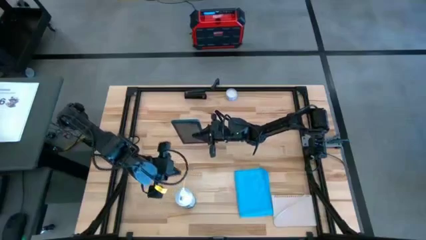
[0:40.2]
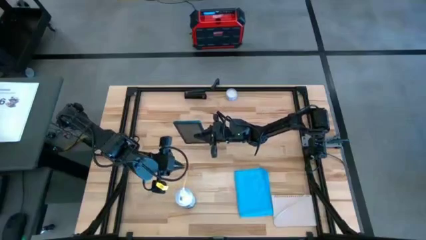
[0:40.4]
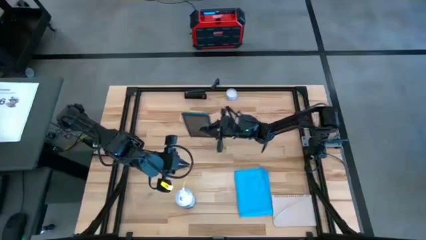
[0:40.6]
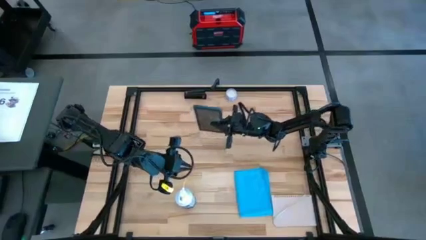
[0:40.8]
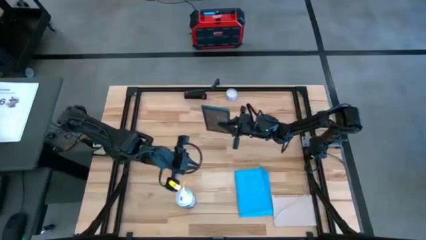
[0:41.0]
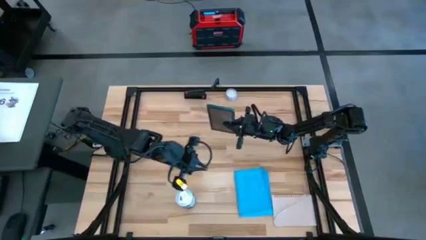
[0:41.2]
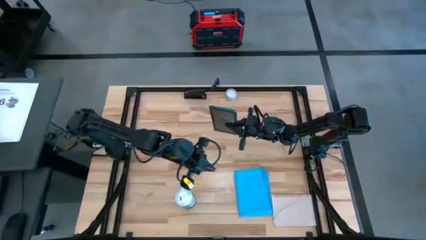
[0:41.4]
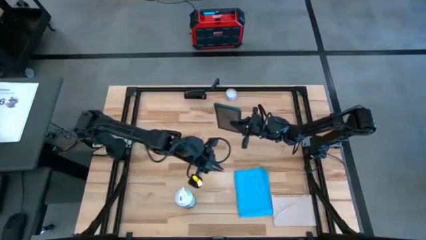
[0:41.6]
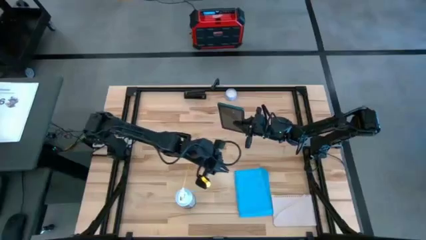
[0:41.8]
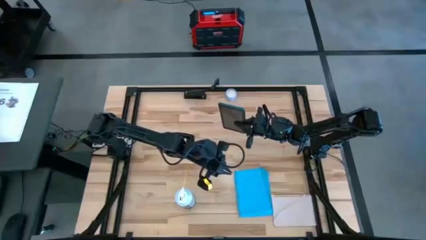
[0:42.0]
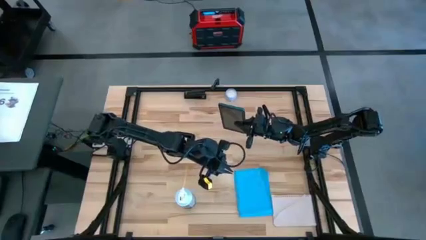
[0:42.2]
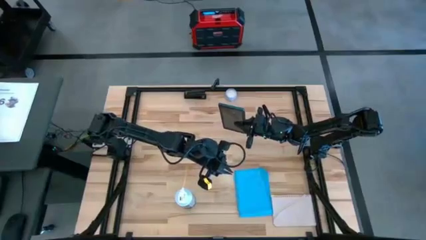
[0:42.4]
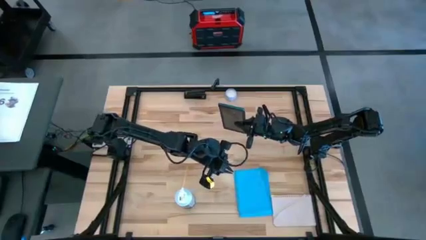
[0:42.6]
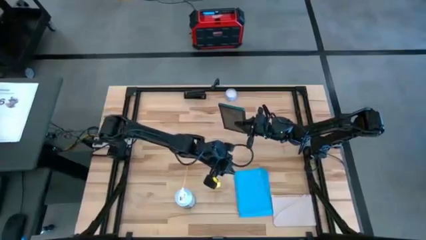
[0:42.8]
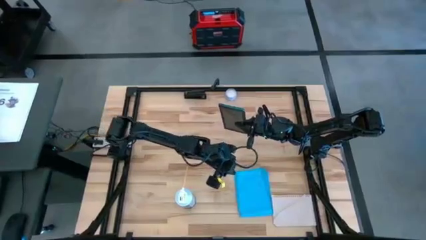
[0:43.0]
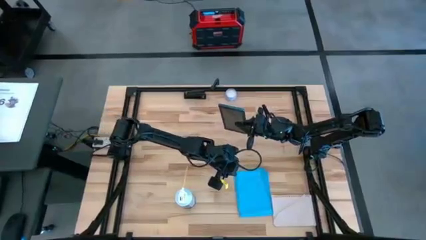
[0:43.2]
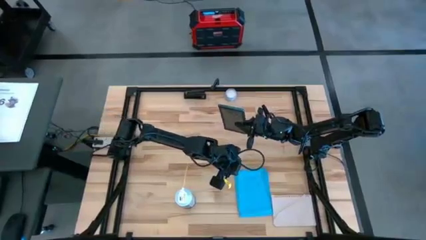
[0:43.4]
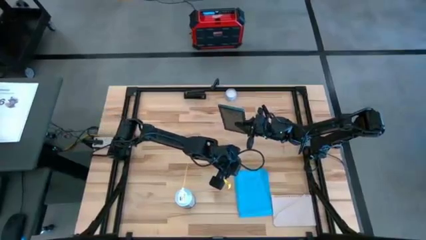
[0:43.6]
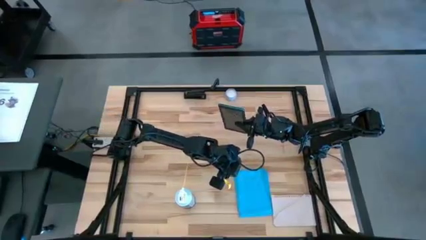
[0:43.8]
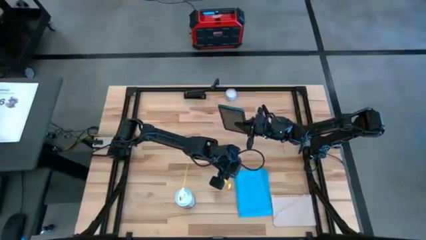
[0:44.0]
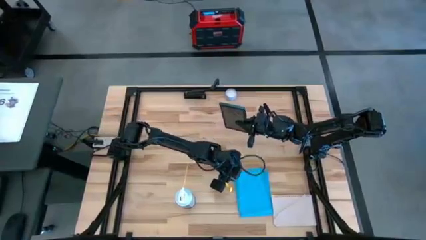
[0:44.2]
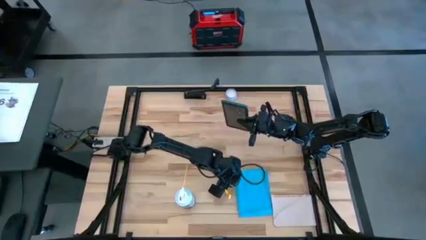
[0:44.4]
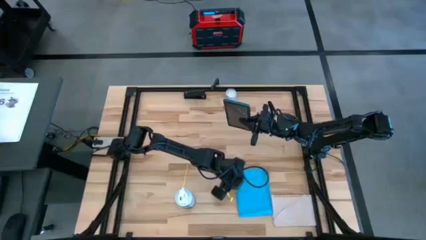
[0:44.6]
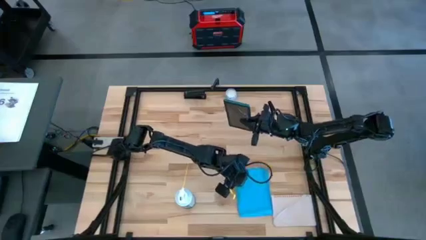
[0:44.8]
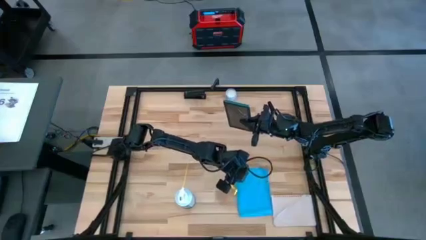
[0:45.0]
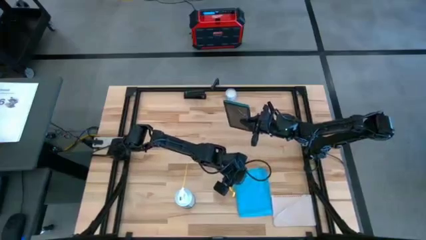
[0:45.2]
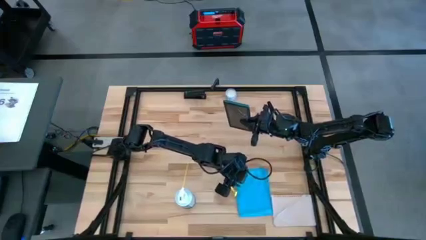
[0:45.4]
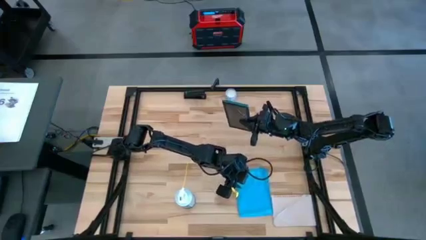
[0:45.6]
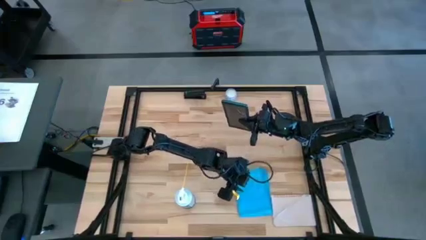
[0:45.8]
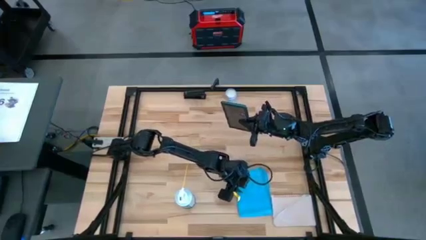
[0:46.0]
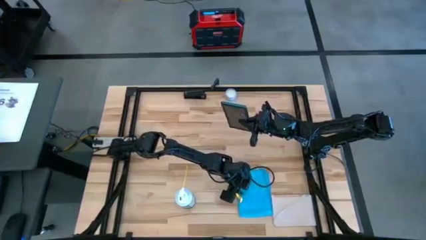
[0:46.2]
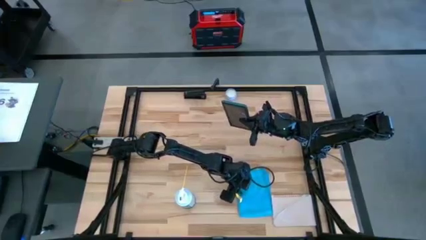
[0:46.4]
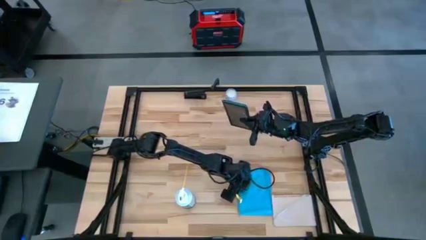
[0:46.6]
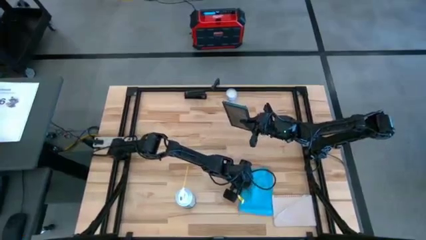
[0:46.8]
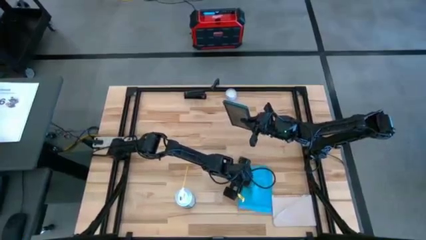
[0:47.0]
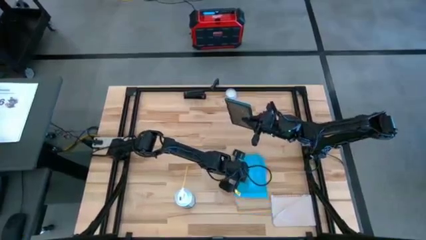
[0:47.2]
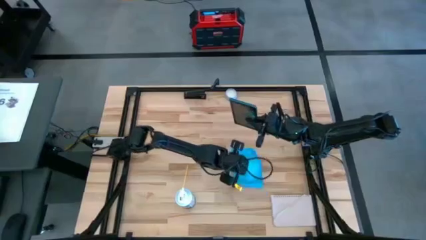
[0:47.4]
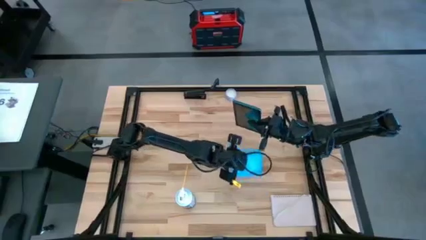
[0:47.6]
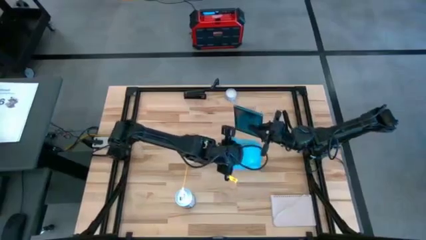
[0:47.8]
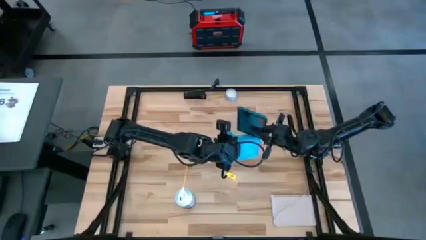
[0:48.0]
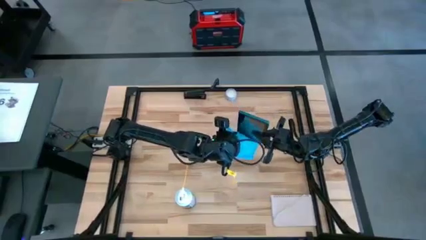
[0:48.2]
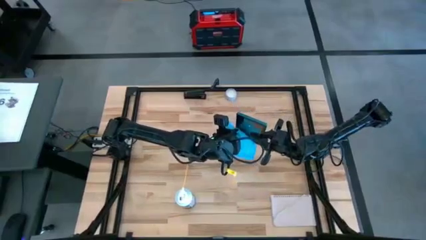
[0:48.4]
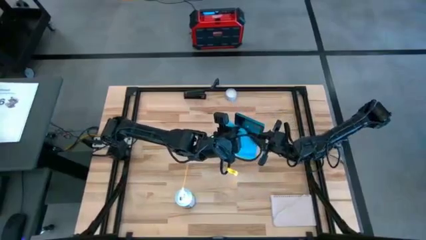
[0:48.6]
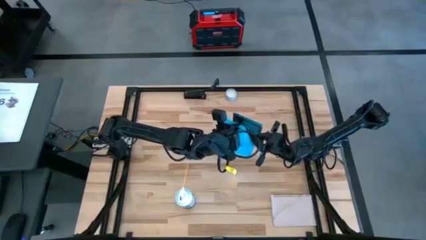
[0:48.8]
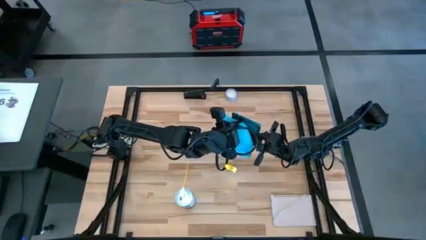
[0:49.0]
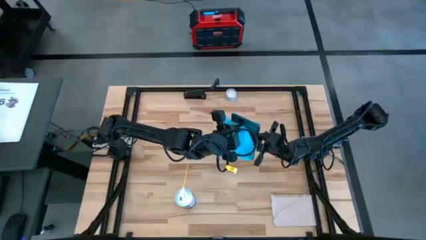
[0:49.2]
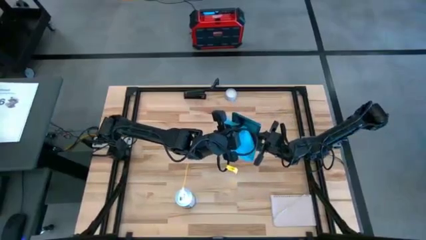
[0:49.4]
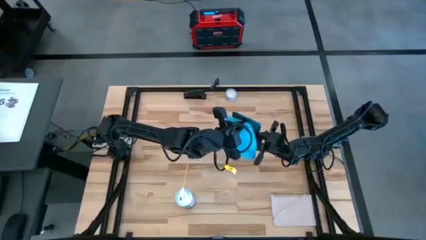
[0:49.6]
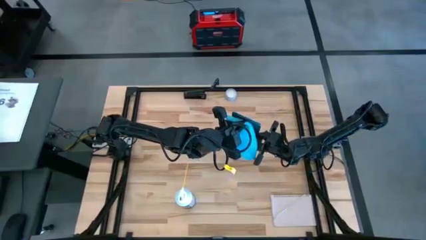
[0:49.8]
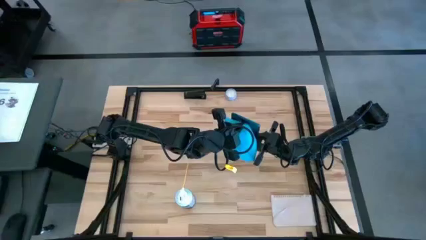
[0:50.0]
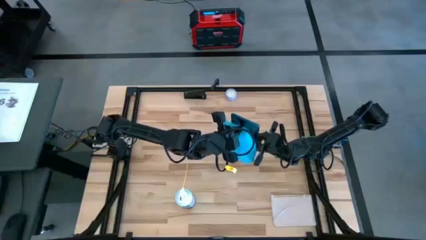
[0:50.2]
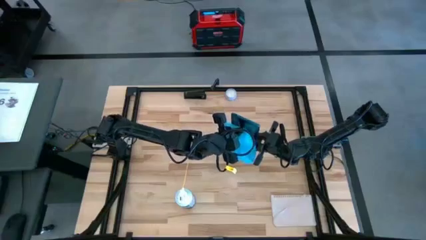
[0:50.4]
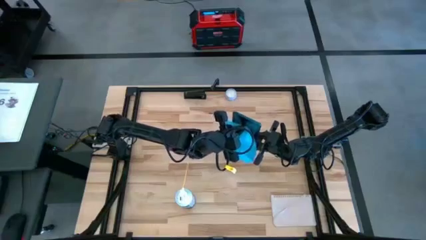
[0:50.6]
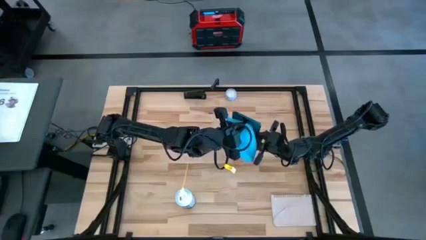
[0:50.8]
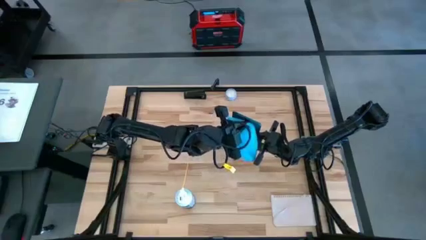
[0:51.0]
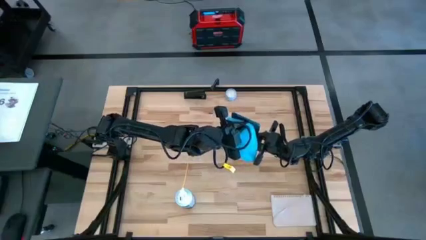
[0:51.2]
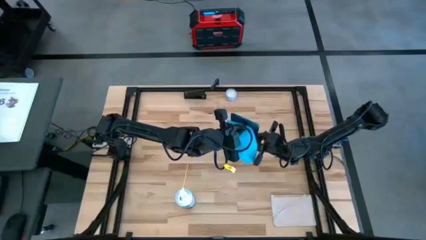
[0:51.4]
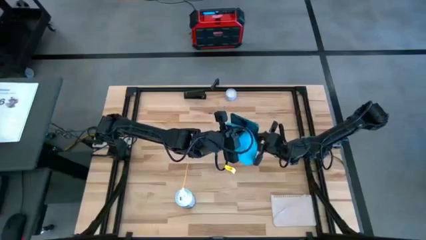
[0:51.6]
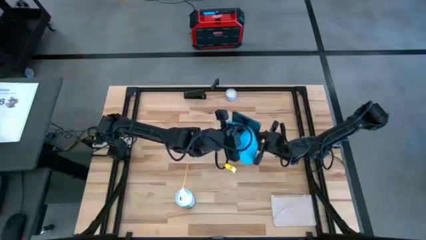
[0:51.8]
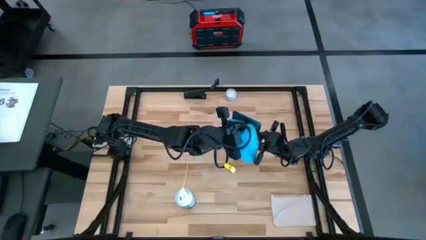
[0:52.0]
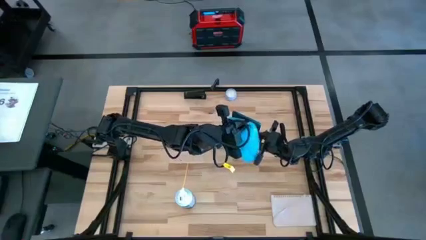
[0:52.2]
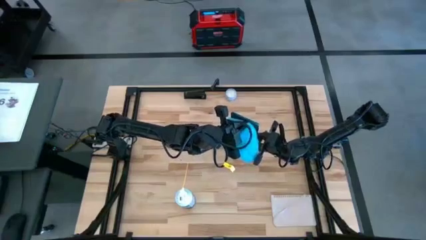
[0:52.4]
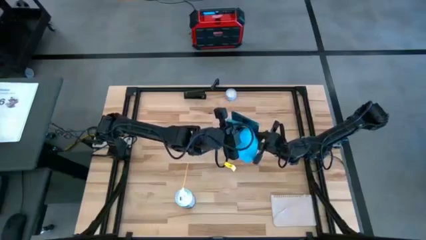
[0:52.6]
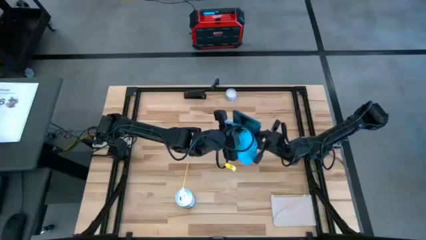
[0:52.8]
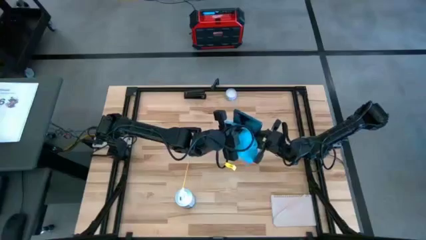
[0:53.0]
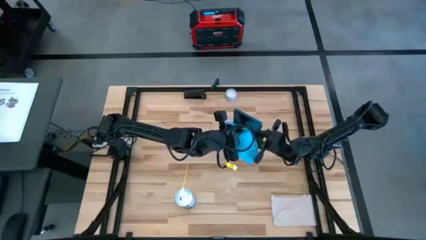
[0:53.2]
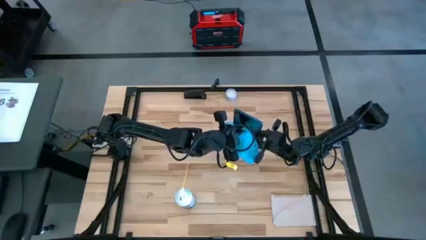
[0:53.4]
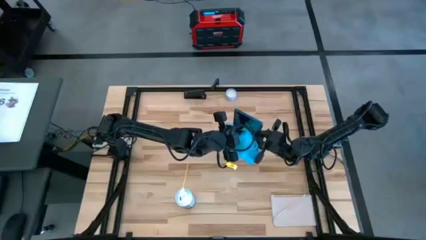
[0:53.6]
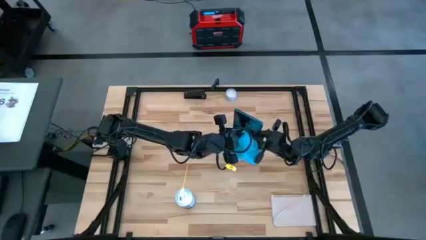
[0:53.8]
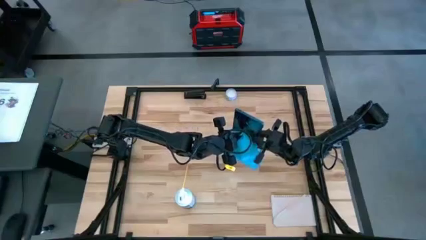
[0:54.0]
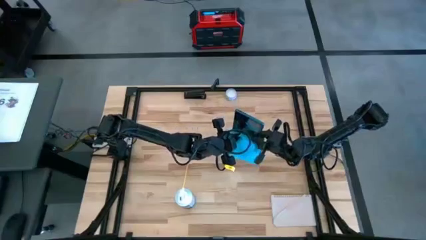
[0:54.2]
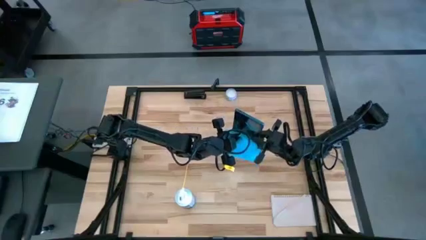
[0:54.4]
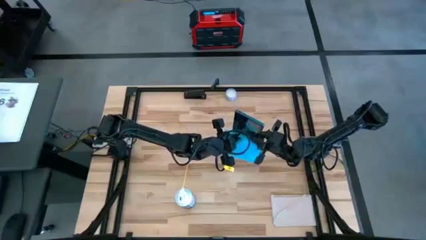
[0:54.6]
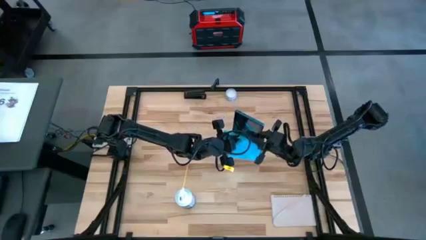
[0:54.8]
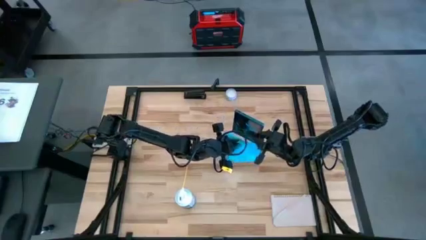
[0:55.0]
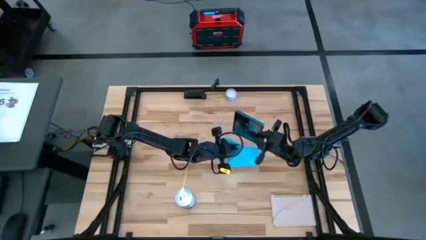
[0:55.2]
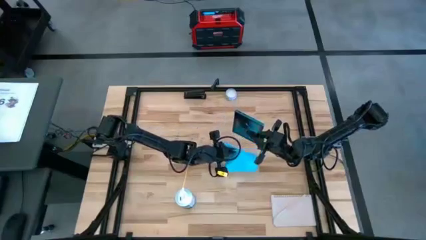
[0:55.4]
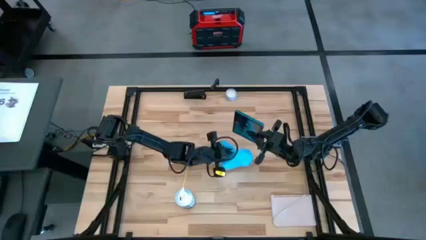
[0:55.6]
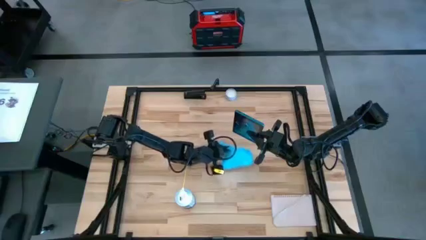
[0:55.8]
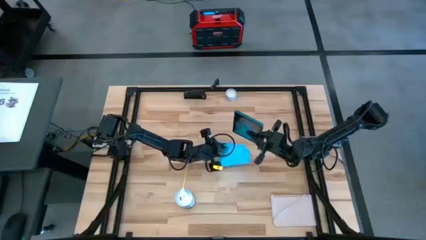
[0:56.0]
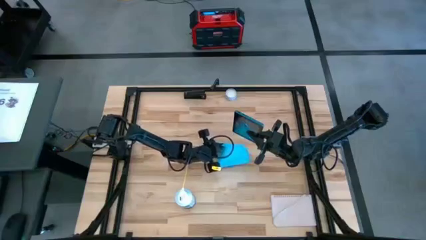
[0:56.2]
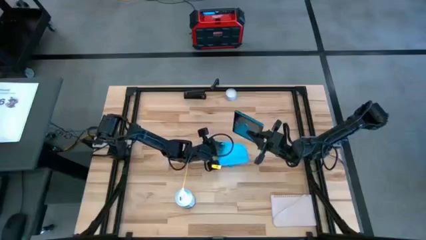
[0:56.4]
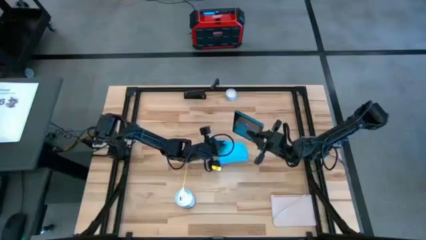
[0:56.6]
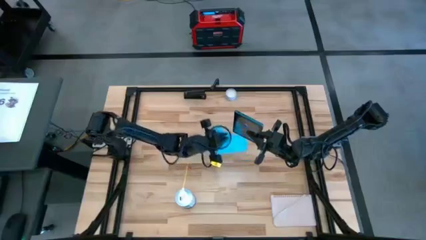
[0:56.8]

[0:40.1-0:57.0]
Task: Apply microfiber cloth
Wipe the front of the black tablet using blue microfiber cloth
